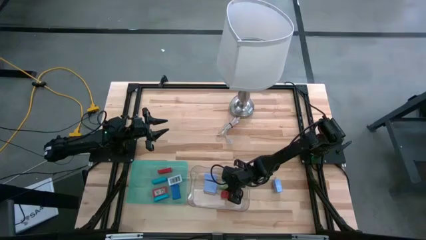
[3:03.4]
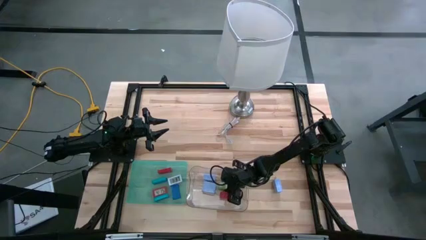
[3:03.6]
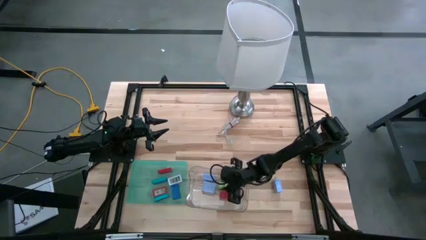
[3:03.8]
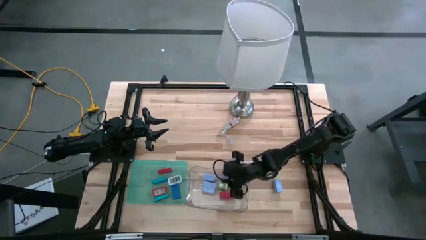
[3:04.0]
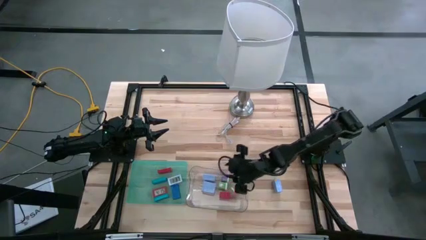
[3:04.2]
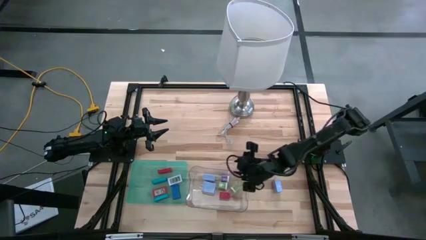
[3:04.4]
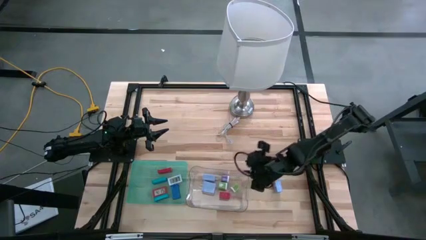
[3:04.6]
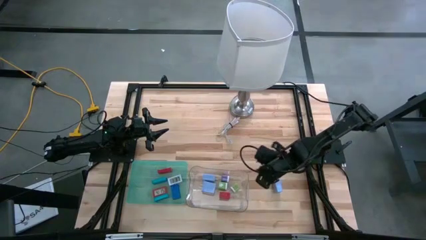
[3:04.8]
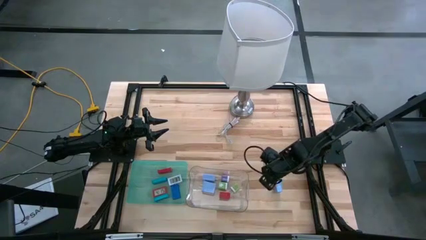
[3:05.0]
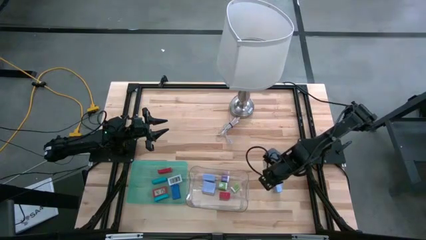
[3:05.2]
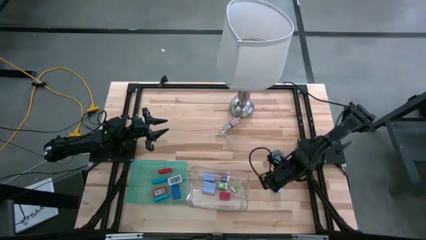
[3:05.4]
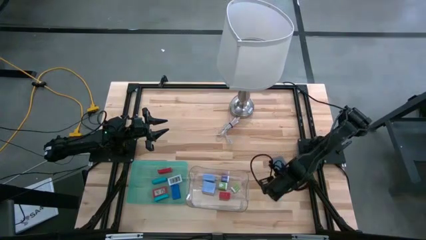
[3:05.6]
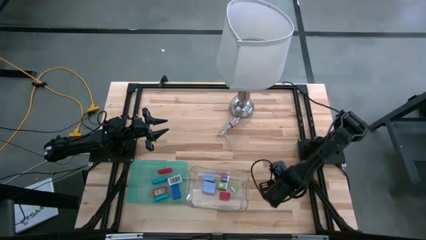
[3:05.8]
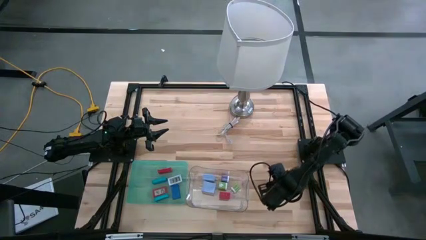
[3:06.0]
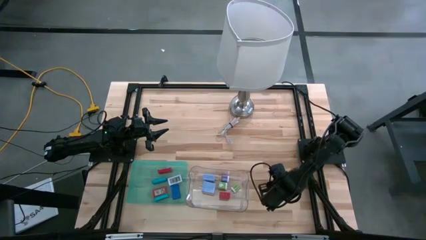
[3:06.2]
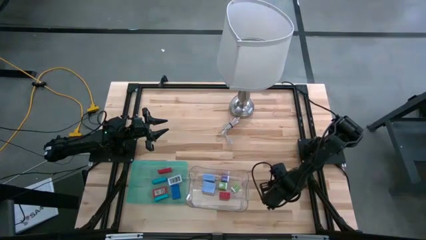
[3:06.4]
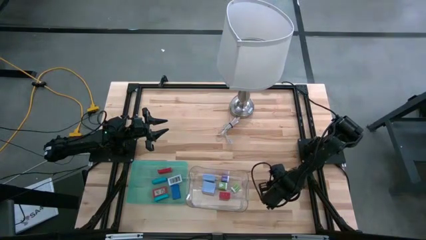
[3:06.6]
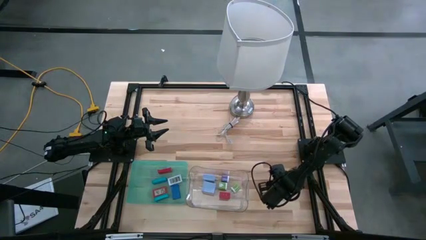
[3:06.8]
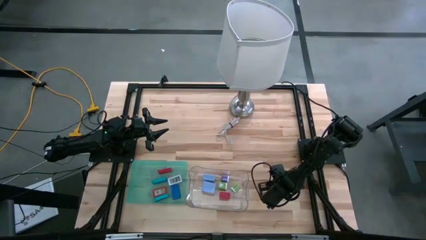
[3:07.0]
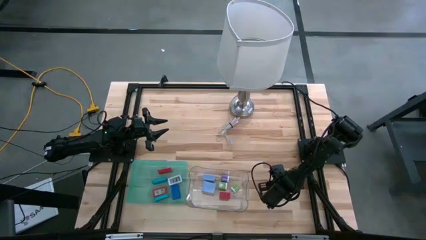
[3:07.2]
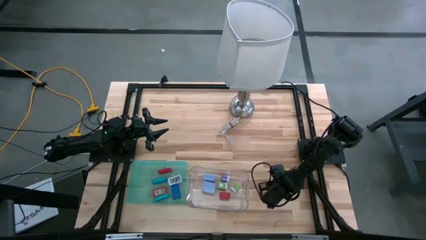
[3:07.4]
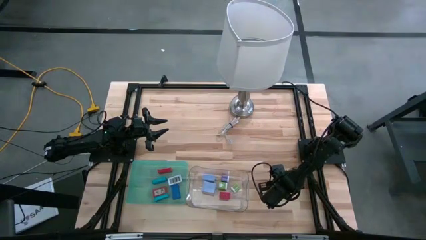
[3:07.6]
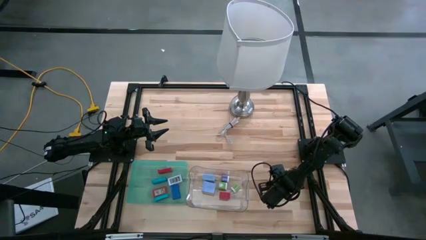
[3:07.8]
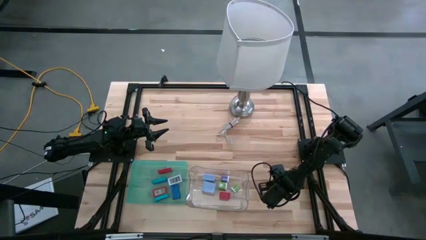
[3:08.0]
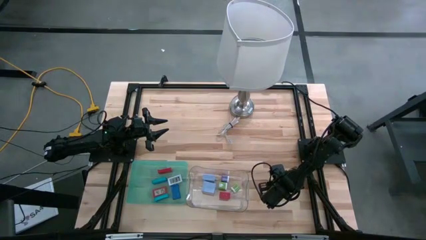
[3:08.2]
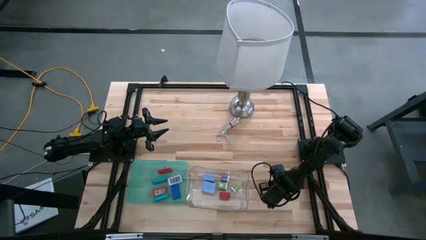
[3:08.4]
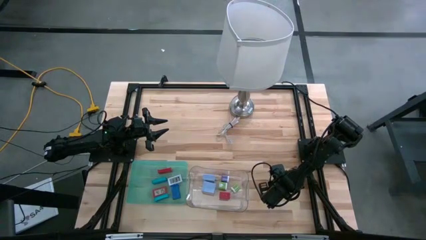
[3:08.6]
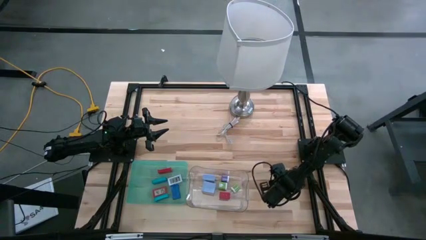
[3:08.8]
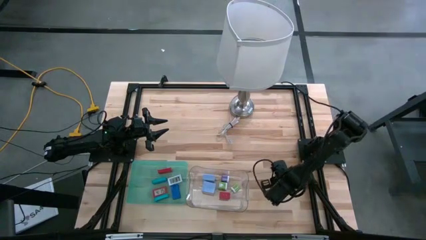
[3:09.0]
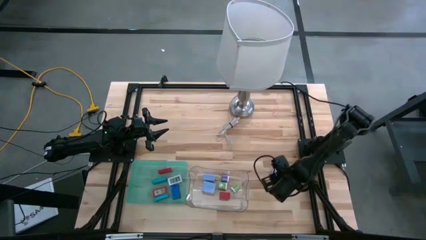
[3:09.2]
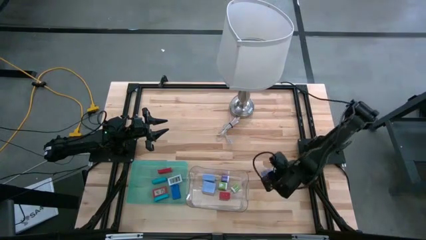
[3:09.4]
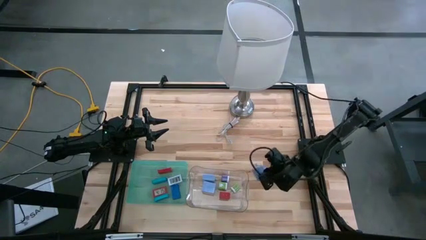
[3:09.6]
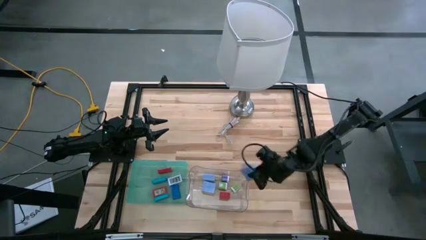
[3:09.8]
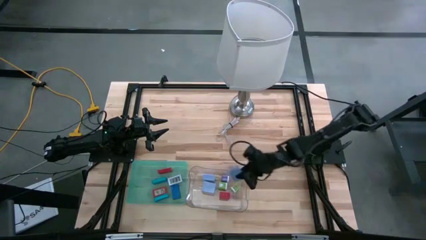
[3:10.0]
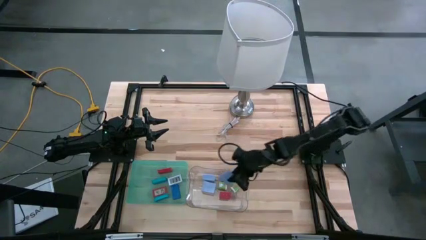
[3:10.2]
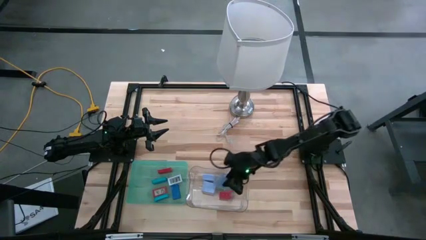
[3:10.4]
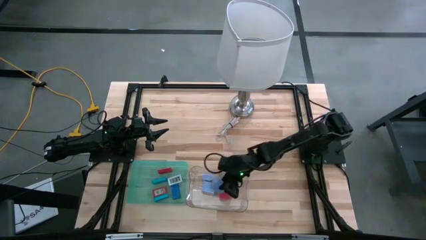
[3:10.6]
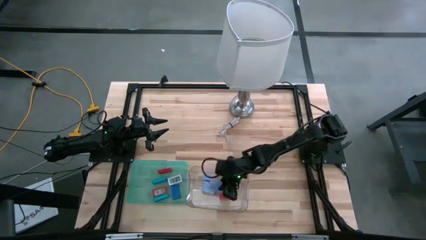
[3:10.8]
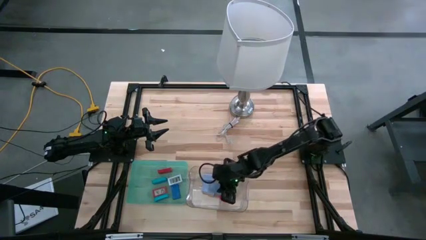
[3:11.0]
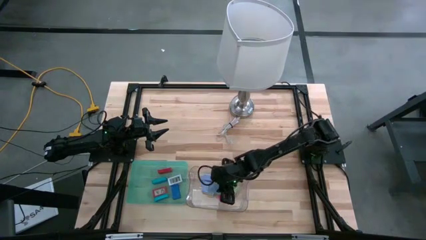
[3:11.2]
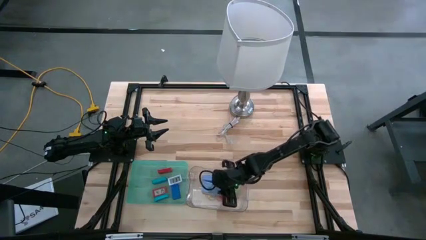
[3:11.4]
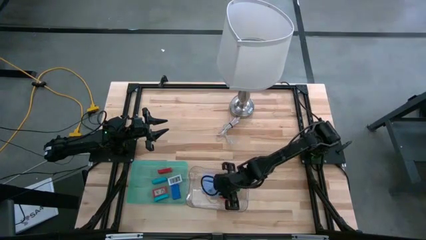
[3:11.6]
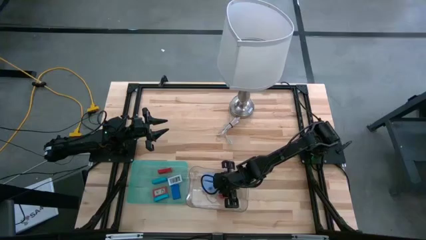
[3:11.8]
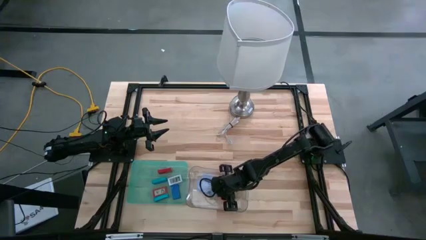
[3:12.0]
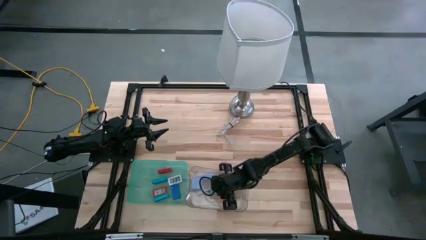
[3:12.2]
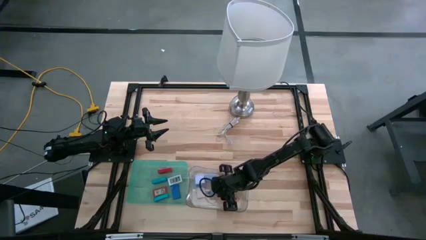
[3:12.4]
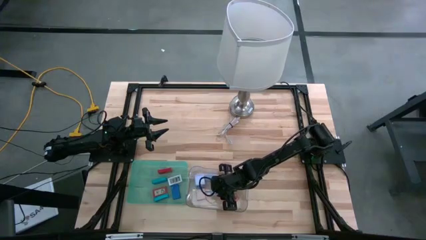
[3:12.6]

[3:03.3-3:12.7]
Task: Pick & Place Office items
Put the purple charger adapter into the transparent bin

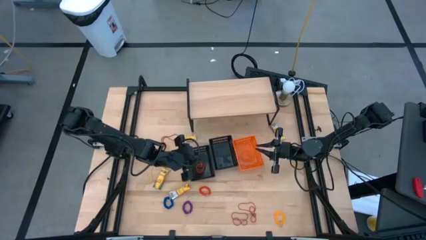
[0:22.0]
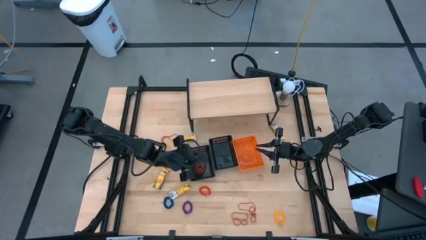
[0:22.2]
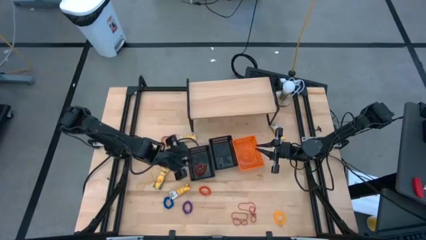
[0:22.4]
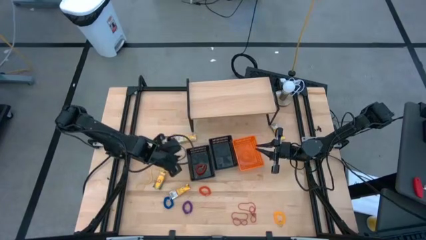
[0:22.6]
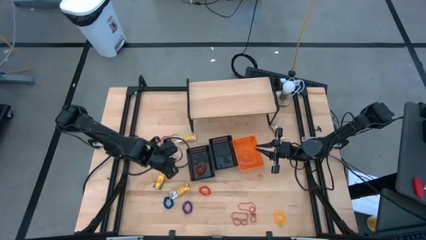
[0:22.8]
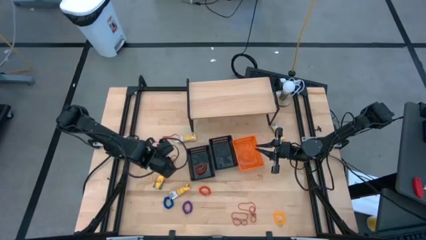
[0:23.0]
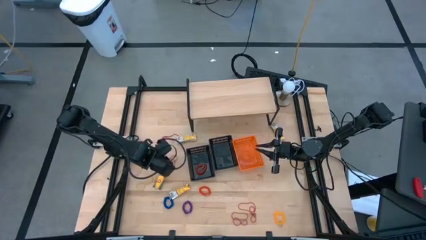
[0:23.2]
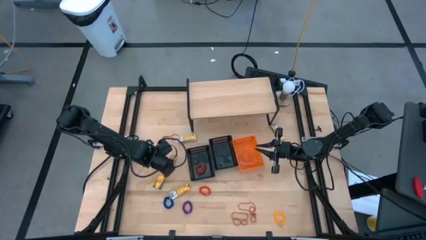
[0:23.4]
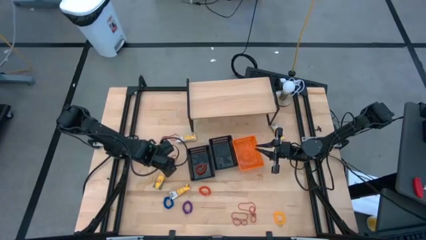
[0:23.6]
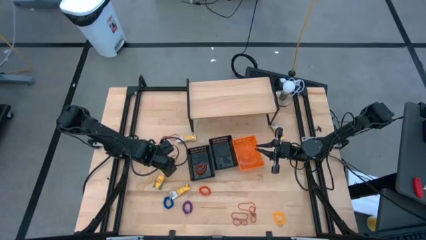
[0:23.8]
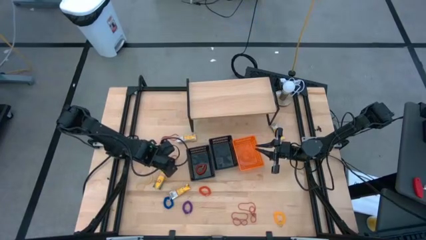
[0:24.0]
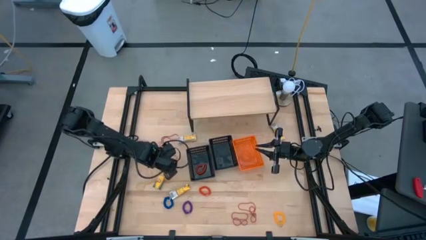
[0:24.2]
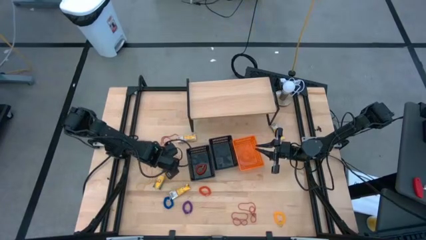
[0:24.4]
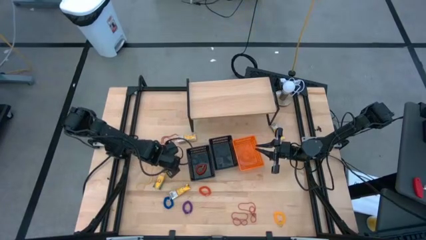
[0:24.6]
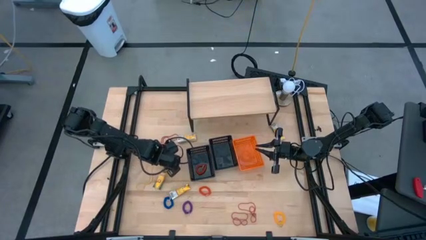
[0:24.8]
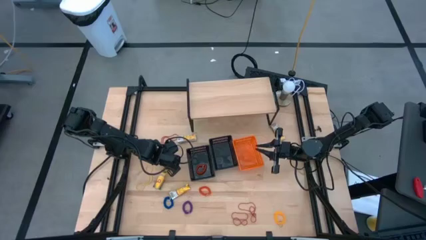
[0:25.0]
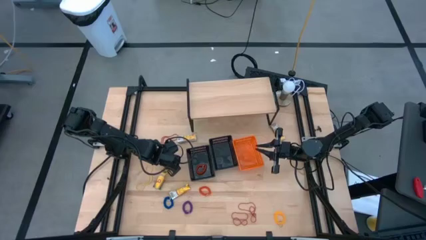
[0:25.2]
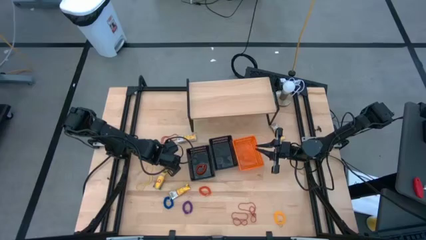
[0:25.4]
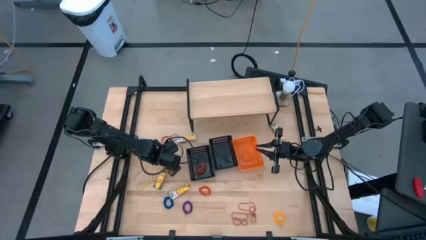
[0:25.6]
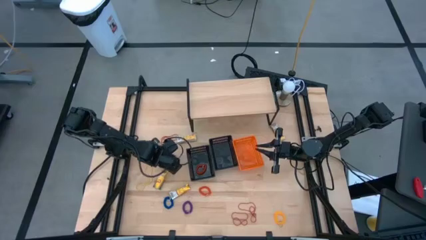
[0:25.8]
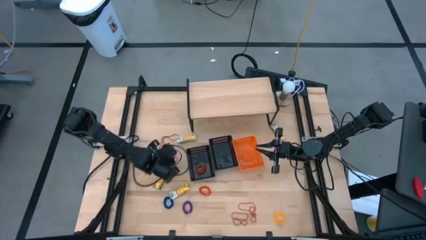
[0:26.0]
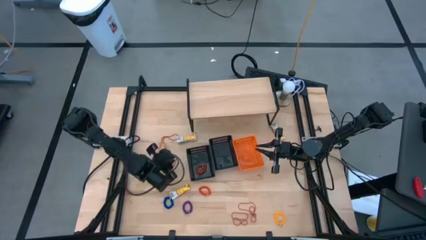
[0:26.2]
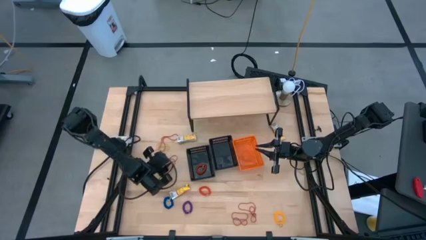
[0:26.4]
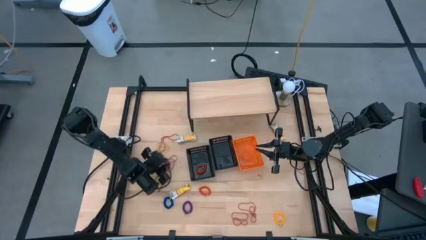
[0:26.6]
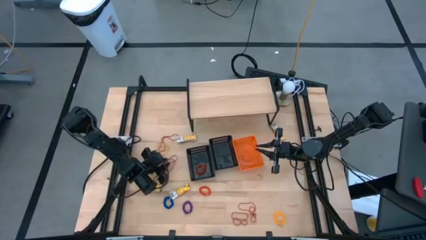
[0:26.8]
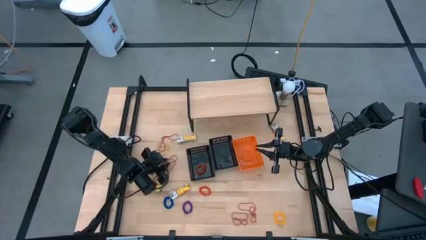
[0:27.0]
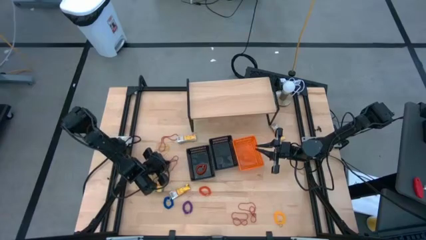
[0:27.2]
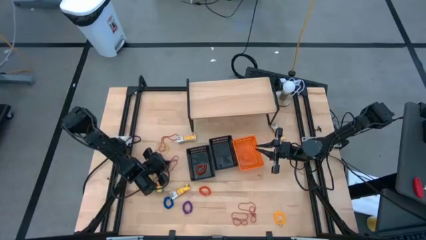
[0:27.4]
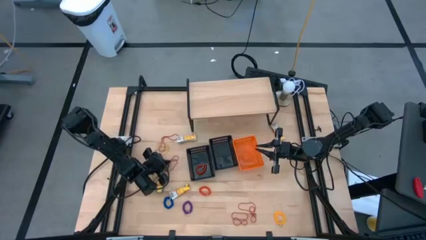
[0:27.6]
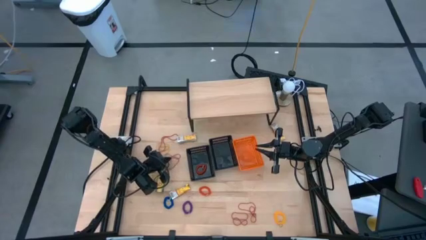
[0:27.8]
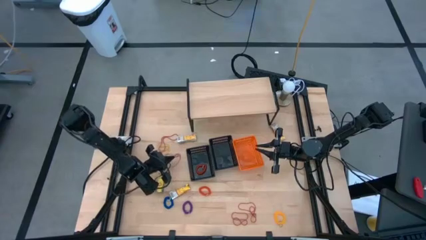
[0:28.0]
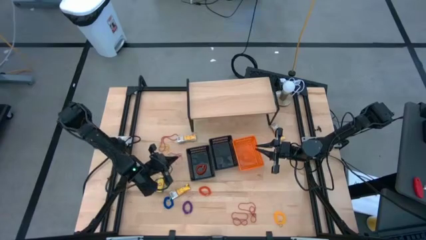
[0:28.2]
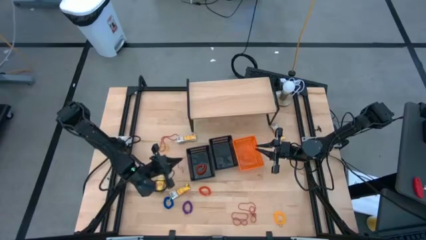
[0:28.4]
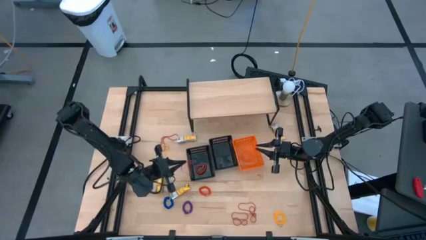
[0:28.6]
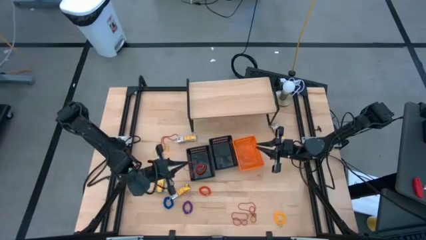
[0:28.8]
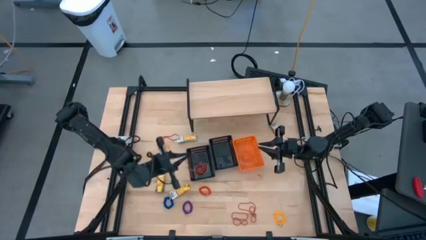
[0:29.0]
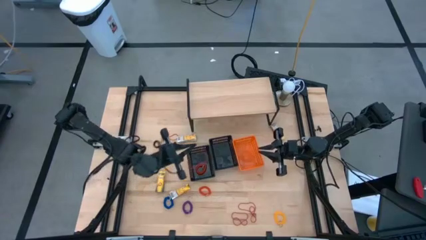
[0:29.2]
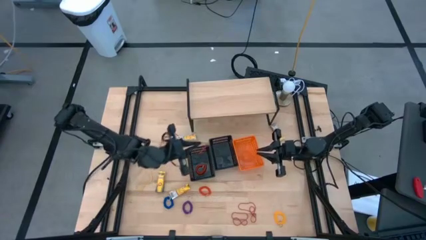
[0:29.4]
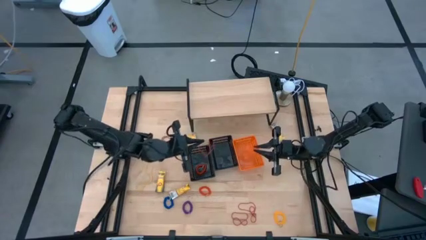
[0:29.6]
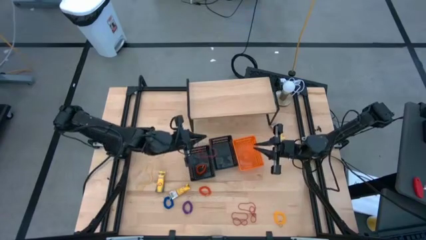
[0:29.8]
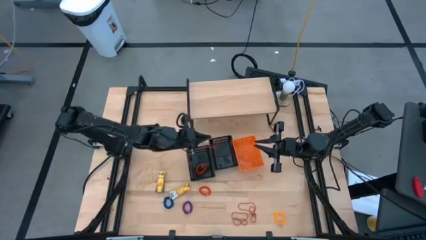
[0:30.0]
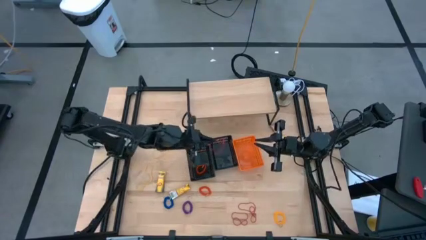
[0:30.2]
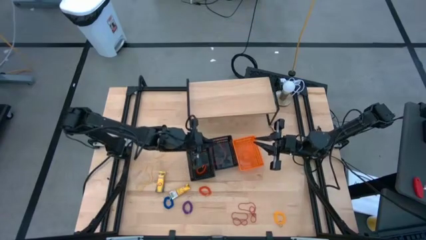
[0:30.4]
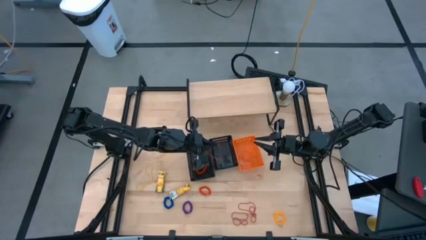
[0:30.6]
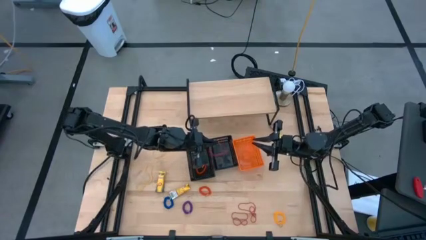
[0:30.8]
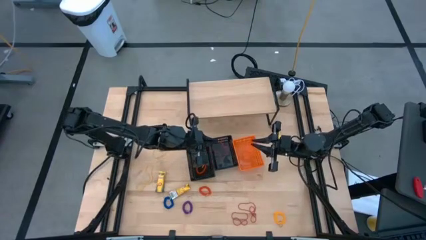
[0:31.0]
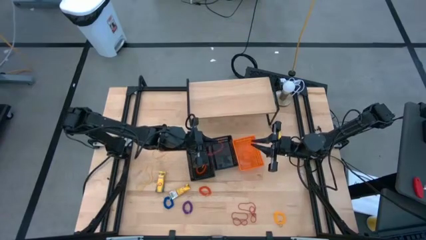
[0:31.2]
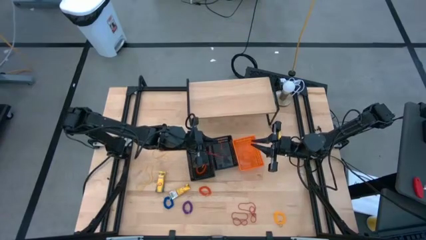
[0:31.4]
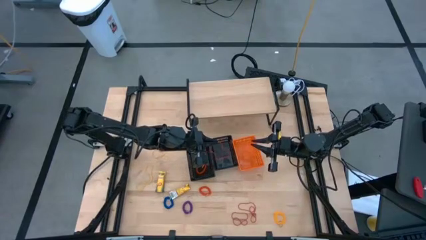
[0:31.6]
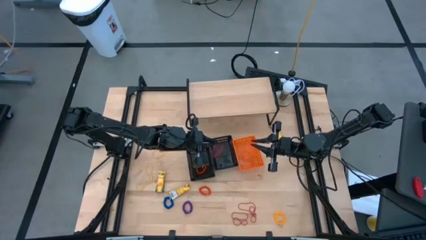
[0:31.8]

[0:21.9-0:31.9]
Task: Pick & Place Office Desk Supplies
Put the orange rubber band into the right black bin
